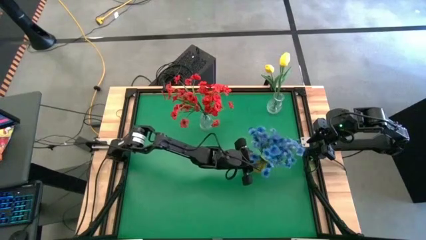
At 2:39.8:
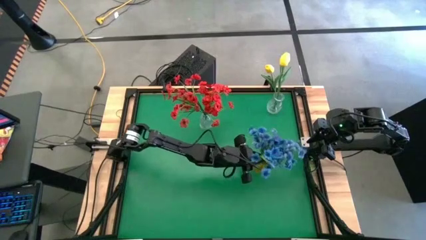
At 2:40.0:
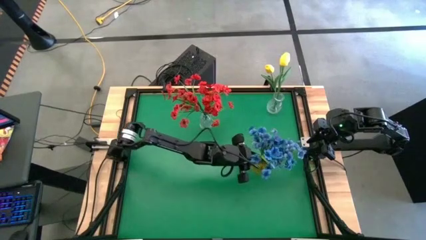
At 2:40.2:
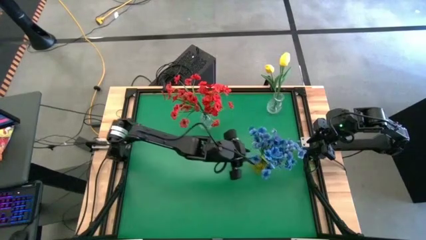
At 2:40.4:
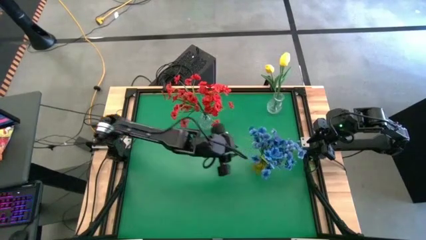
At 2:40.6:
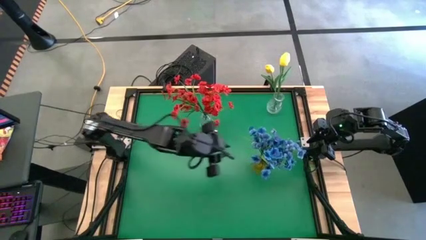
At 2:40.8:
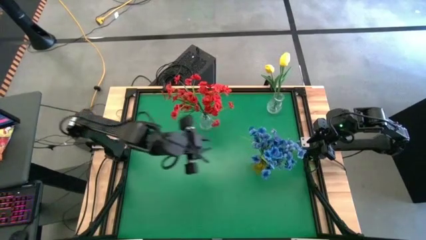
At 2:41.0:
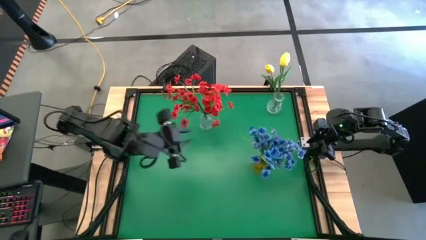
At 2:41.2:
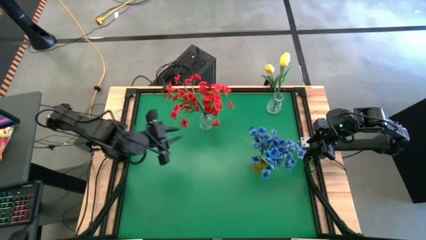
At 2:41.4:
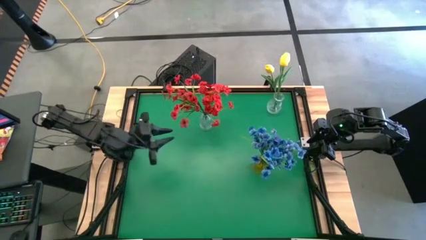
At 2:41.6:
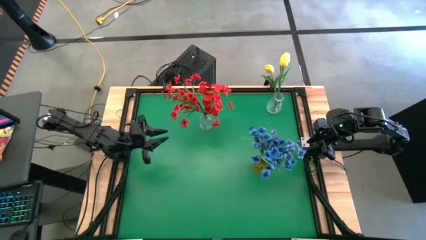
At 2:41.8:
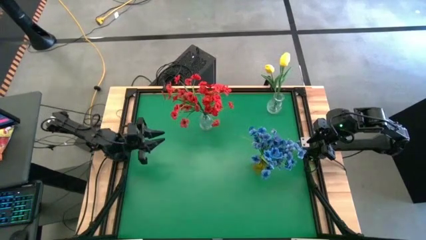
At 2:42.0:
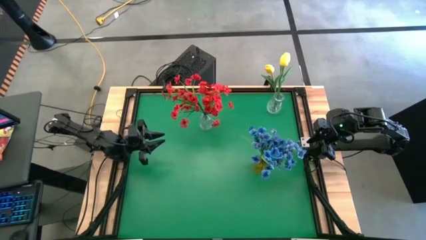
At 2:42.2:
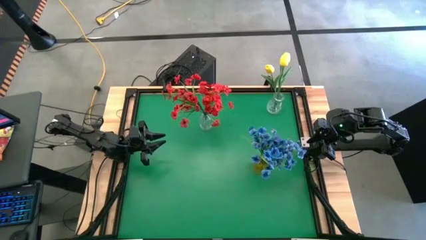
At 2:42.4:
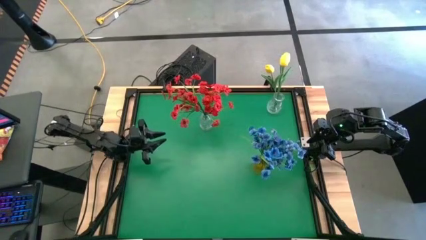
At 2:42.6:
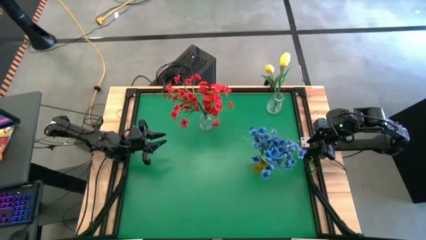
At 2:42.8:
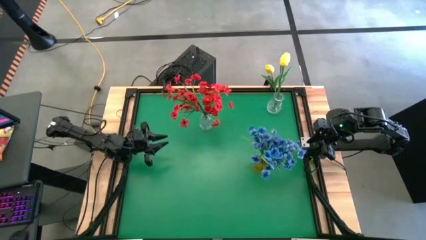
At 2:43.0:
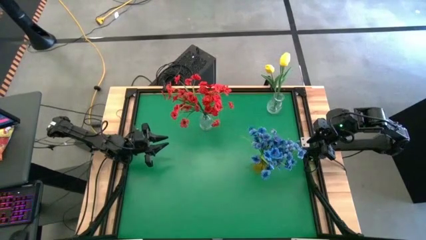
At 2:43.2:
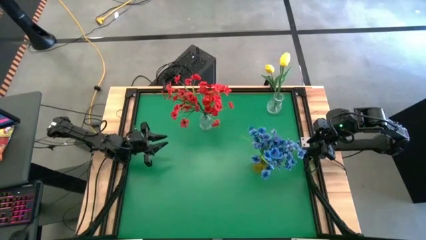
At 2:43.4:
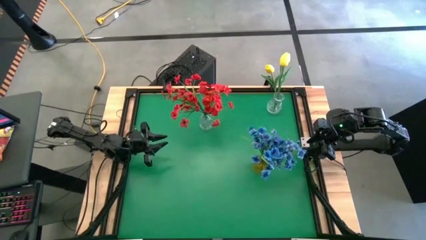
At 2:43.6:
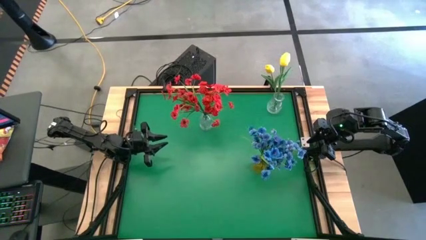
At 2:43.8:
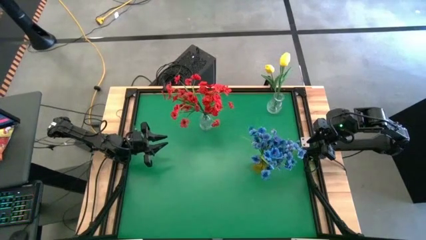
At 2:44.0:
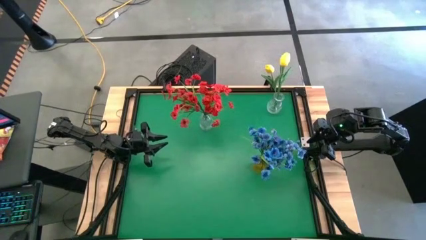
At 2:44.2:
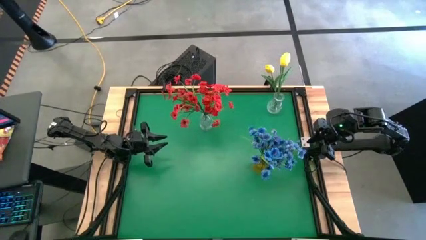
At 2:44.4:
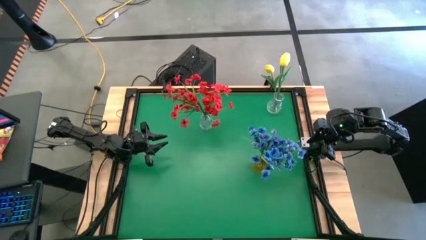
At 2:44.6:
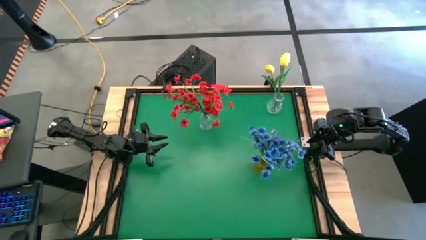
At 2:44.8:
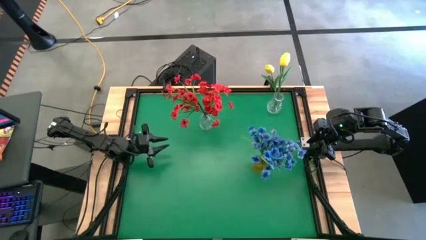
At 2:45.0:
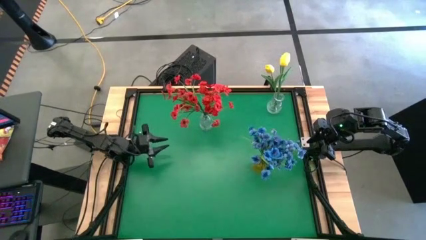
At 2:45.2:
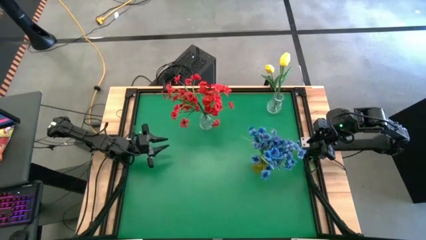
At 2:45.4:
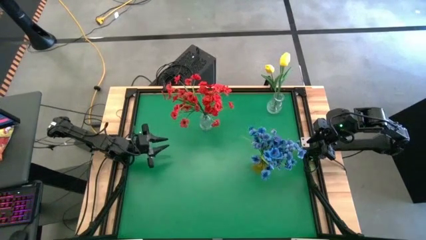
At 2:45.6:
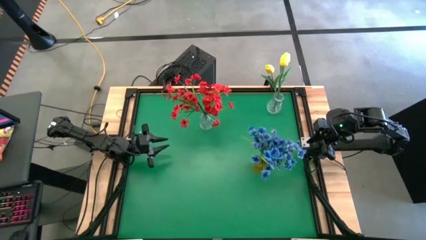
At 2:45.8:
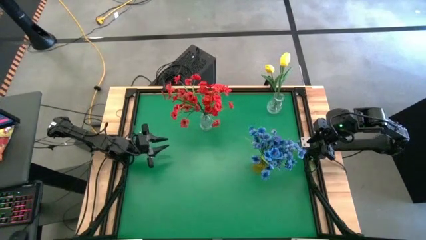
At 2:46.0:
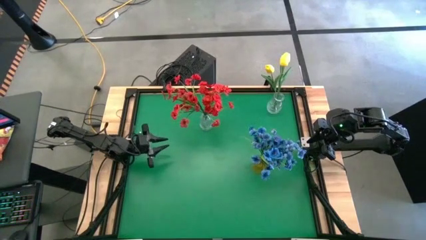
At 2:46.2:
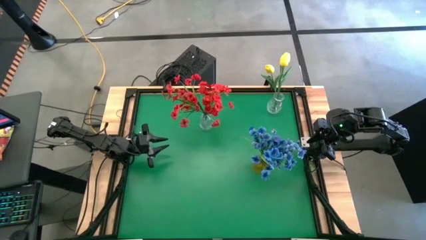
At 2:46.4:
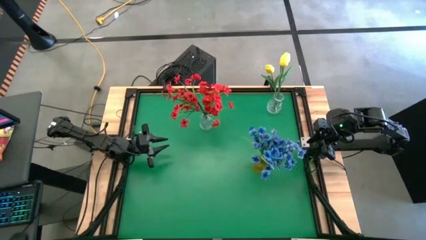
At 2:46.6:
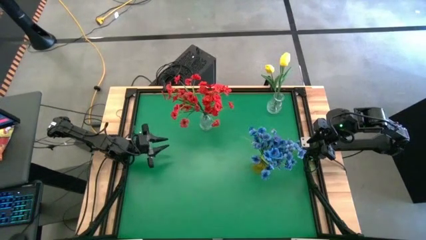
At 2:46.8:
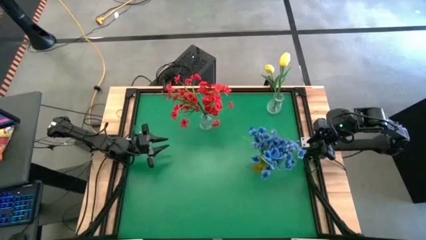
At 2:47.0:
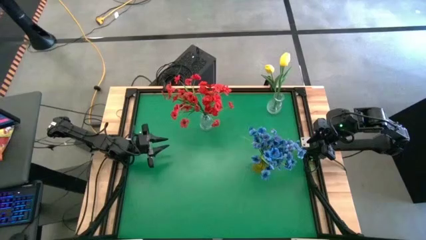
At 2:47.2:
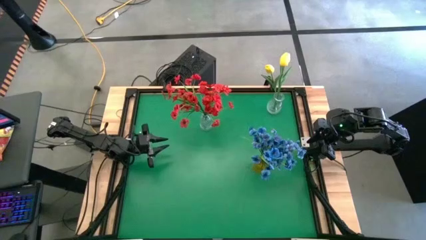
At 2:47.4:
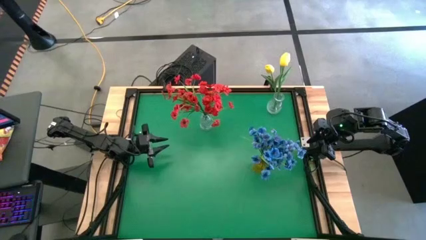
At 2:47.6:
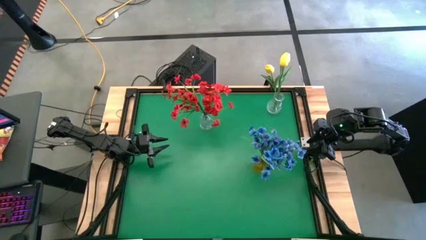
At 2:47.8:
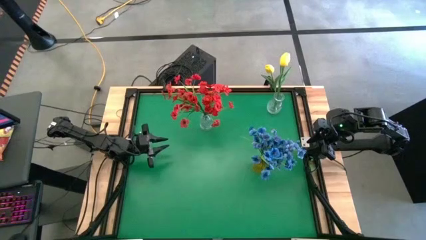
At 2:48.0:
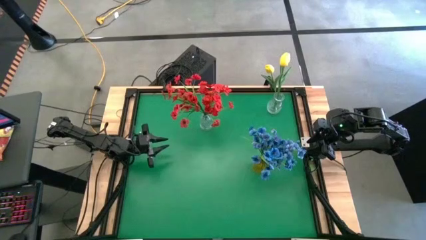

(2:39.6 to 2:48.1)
Task: Sort flowers into vase by color
Return to Home Position

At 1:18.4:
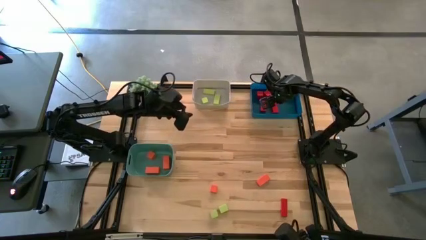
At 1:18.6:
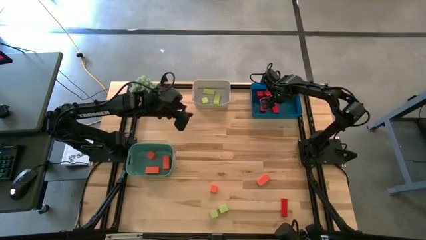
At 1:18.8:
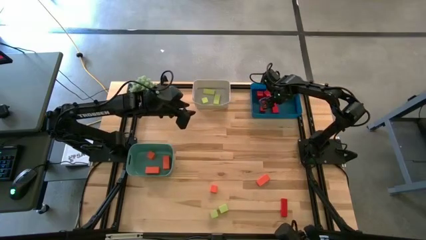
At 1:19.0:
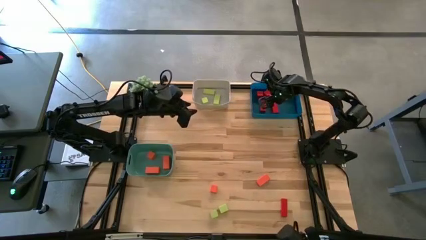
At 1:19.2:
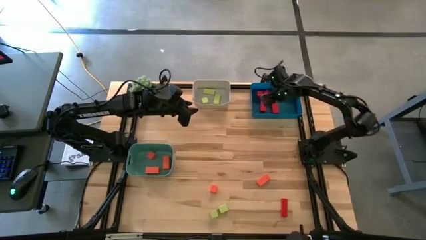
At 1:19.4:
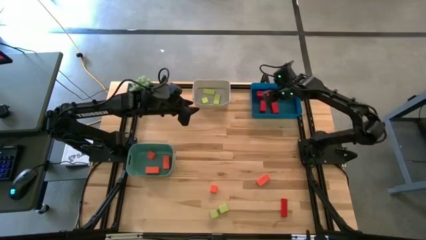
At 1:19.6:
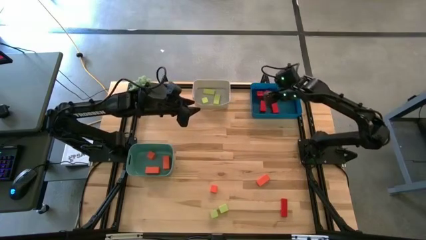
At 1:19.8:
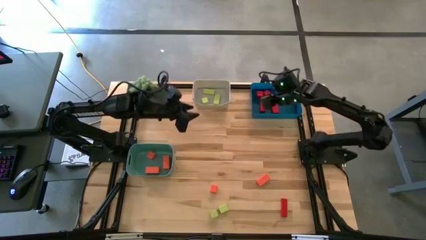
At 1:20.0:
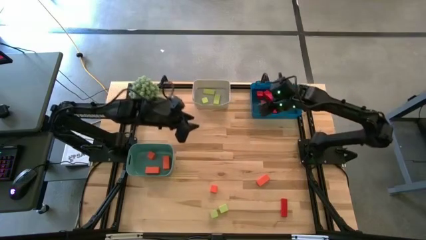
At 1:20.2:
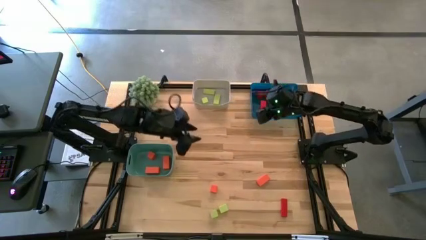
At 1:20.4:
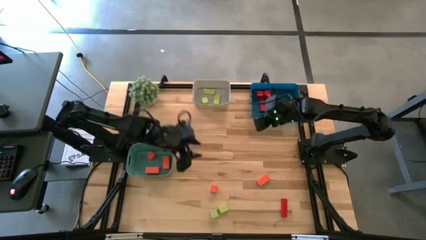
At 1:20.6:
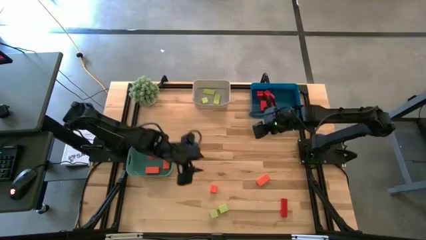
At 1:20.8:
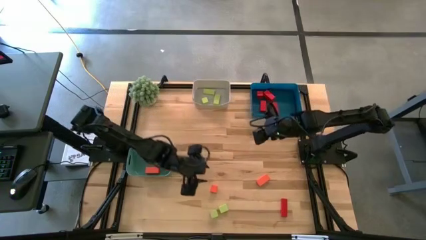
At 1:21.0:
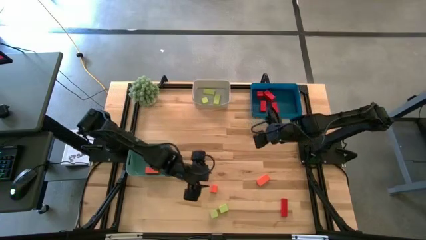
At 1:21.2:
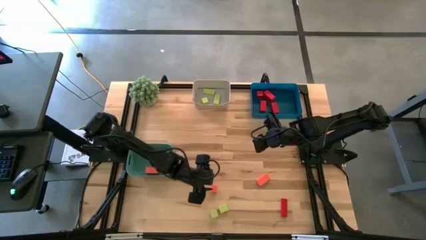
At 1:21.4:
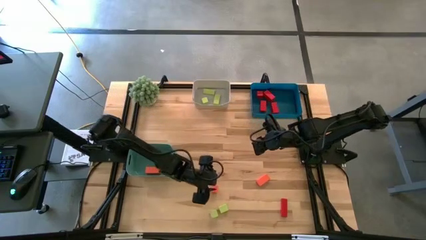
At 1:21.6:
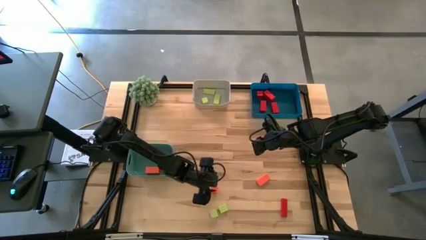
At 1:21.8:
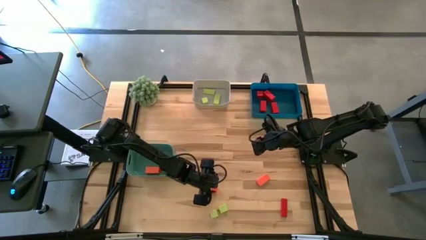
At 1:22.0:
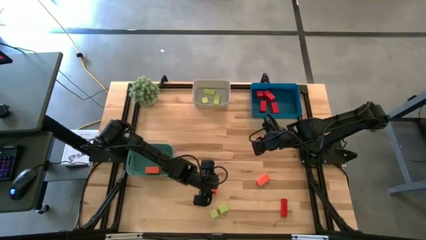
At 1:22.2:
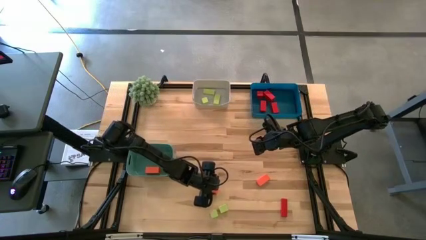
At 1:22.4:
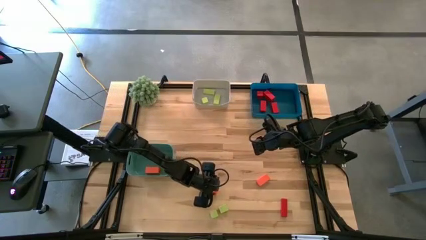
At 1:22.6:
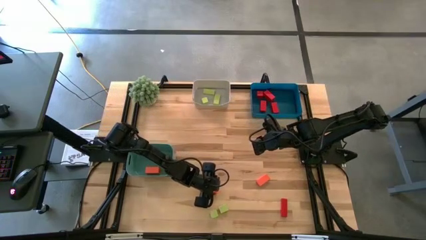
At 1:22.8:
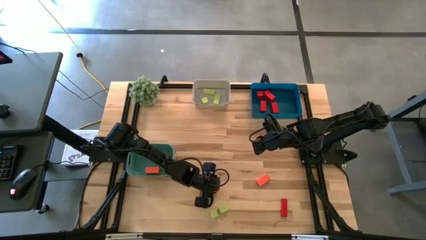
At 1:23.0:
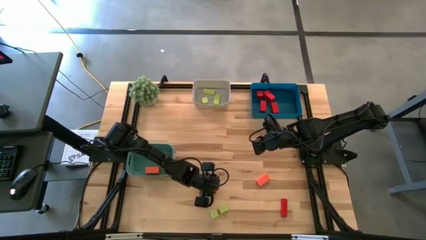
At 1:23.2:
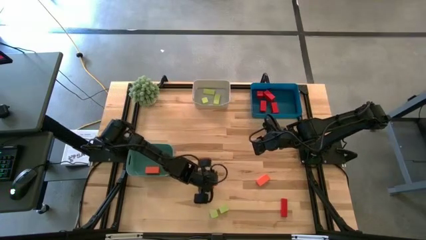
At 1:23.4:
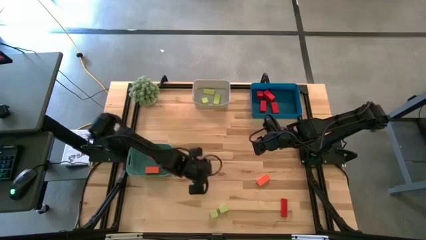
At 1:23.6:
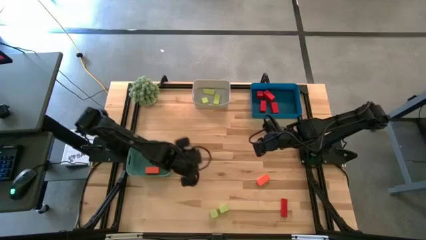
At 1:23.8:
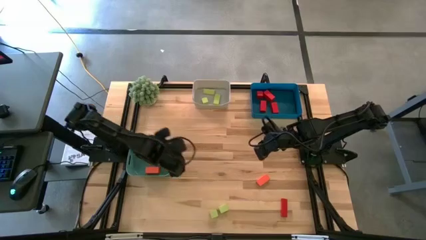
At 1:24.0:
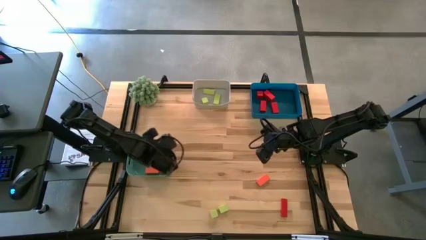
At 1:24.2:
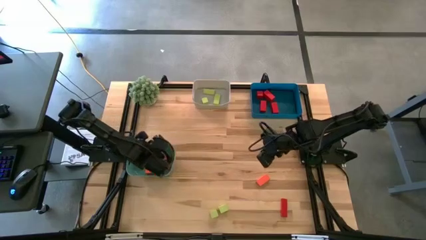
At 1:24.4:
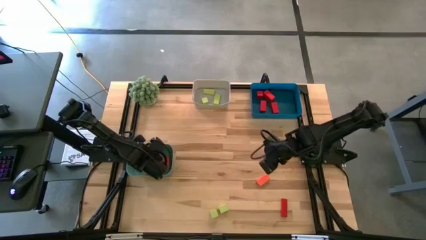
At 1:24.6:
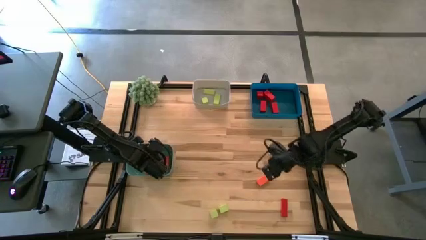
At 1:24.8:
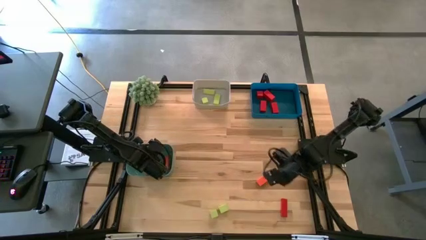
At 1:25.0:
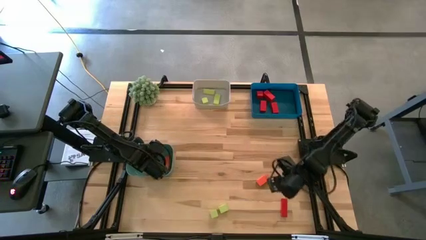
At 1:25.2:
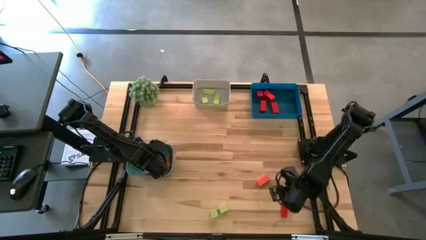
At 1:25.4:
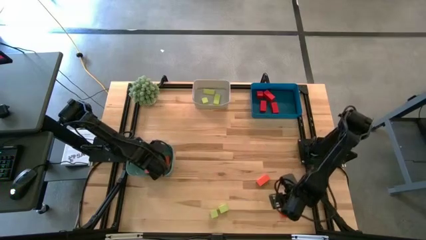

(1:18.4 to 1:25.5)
Task: Sort & place blocks by color
Put the orange block into the green bin
